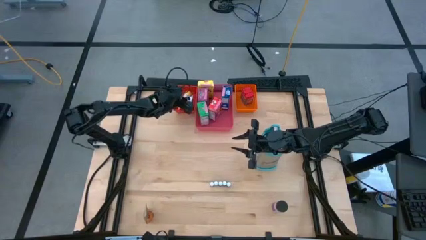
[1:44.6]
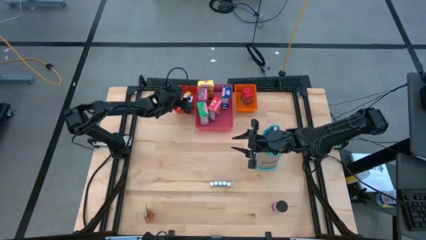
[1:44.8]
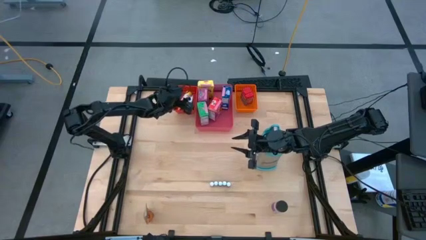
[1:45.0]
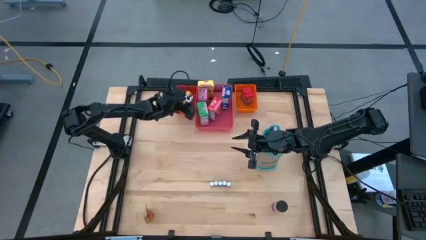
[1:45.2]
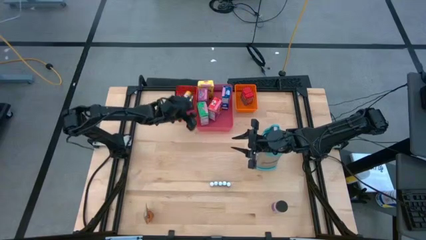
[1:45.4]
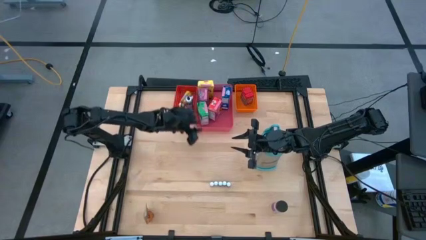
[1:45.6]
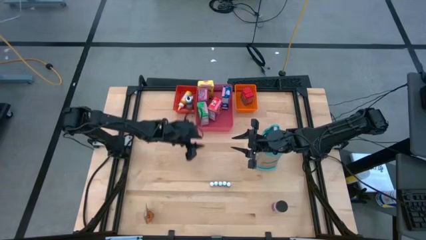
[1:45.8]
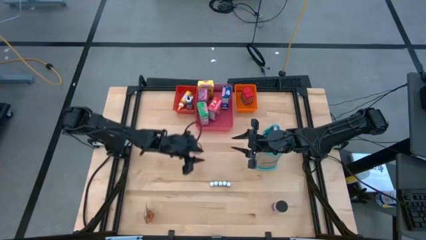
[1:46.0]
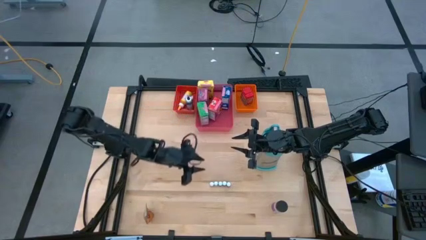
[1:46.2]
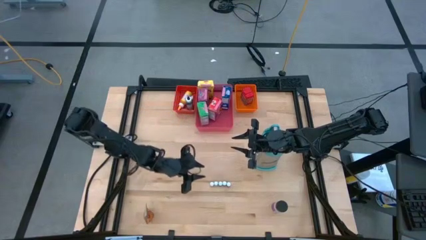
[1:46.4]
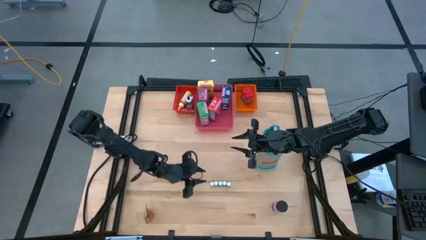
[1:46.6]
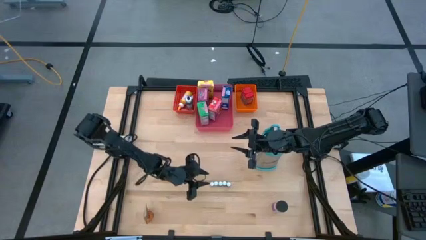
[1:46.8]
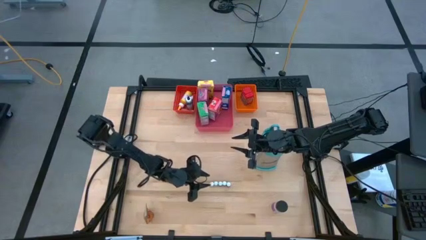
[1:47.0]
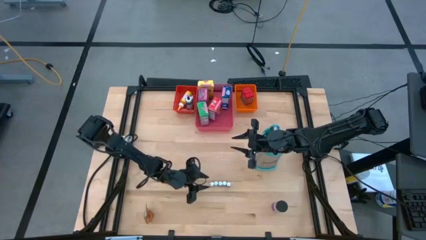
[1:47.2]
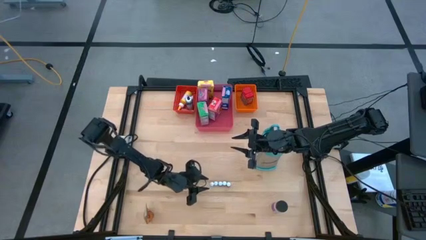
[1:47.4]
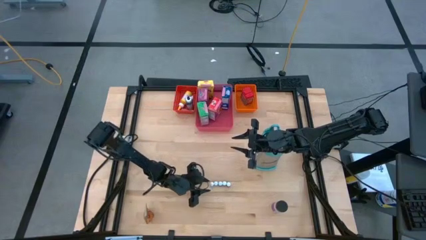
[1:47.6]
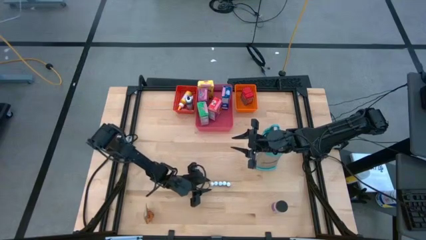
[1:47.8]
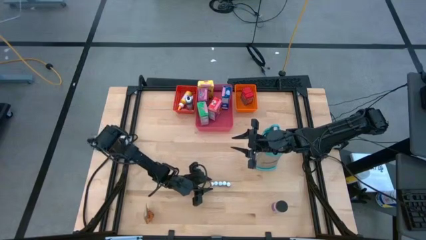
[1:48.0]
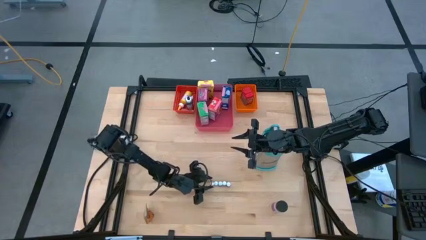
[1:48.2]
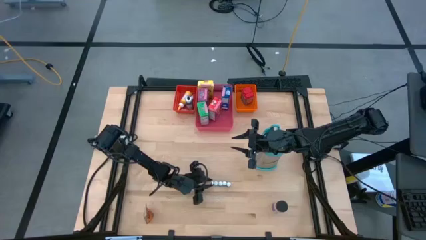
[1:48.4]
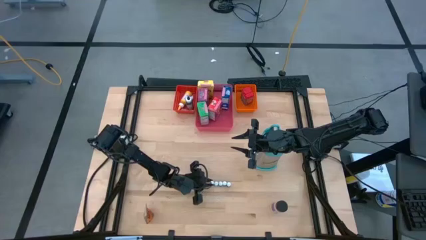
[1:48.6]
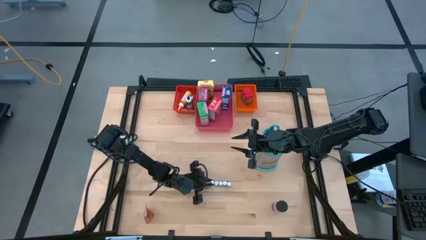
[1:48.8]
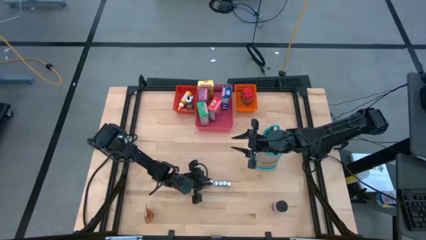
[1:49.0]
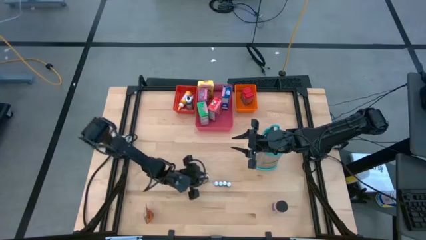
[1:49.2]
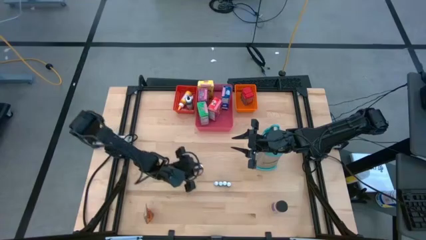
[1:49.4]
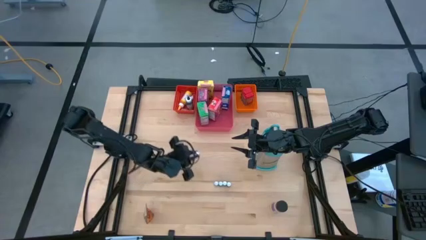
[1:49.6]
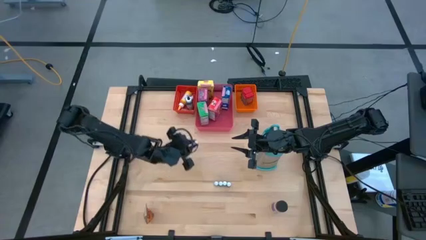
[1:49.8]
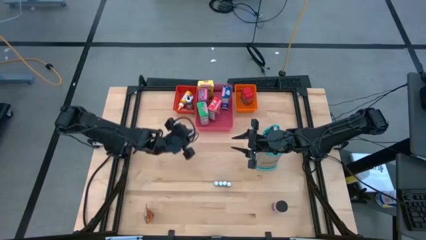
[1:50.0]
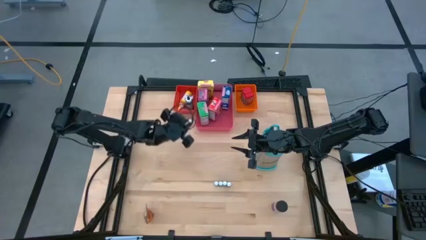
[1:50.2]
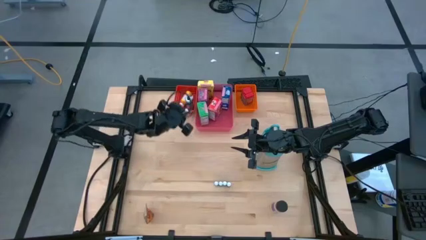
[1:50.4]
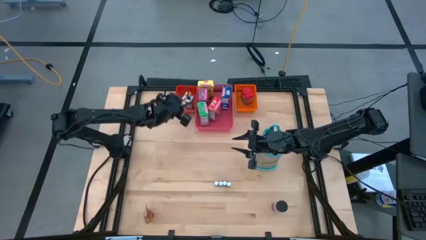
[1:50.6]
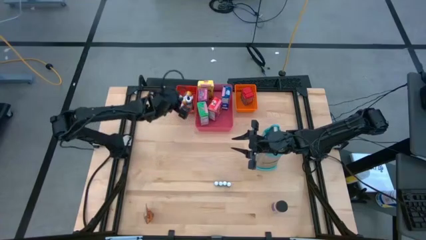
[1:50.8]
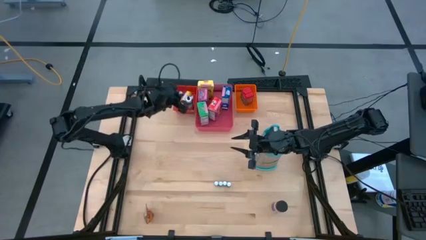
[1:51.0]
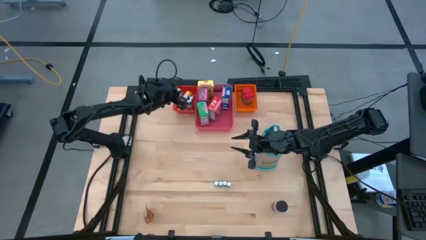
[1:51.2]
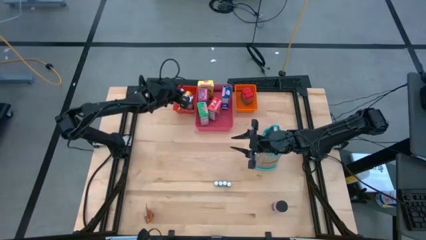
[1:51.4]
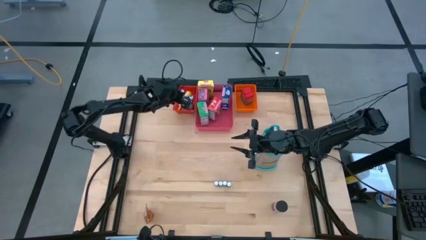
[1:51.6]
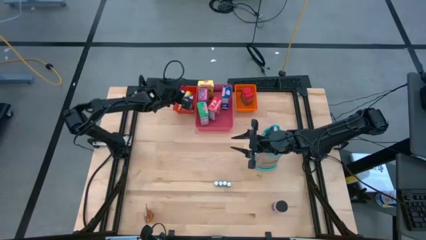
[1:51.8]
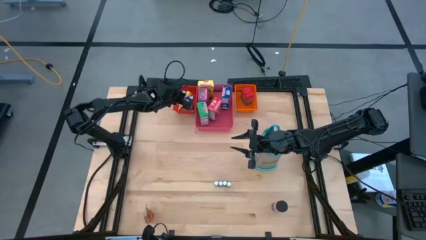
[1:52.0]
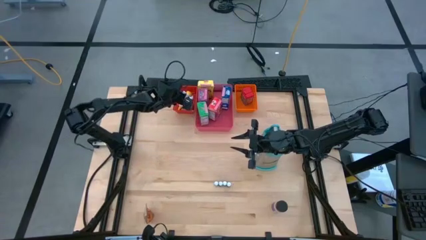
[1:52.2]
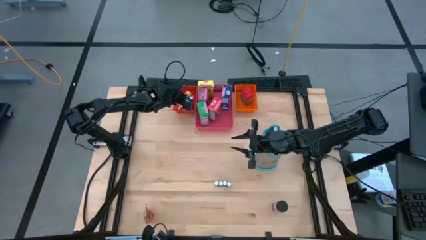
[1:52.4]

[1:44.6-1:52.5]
Task: Pick & Place Kitchen Items
Put the small brown food coloring bottle into the red bin

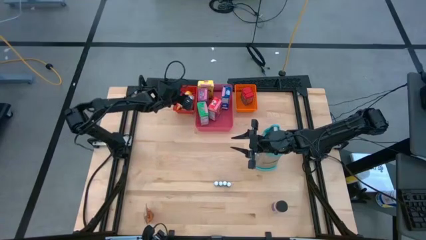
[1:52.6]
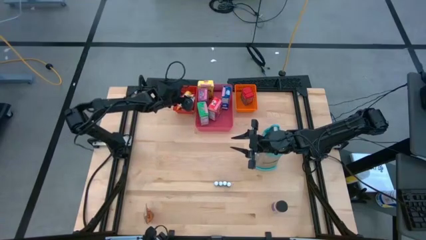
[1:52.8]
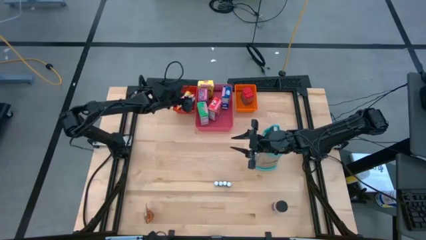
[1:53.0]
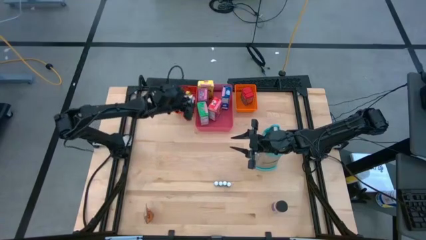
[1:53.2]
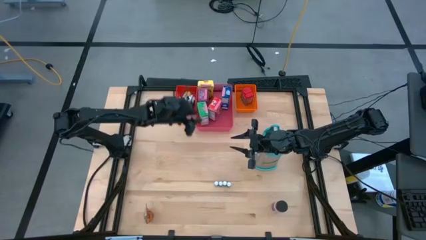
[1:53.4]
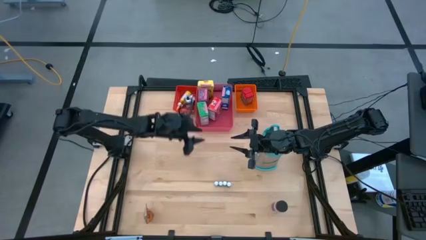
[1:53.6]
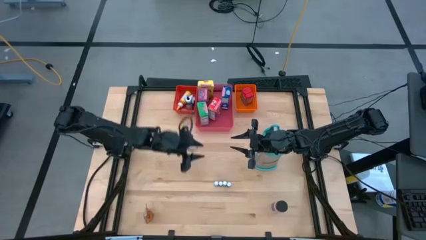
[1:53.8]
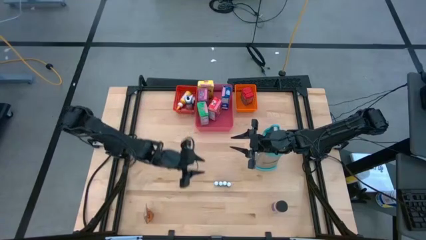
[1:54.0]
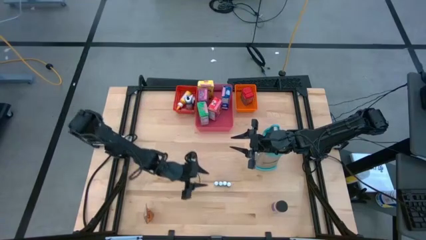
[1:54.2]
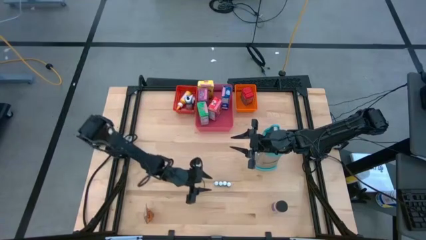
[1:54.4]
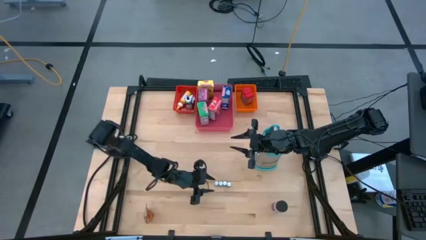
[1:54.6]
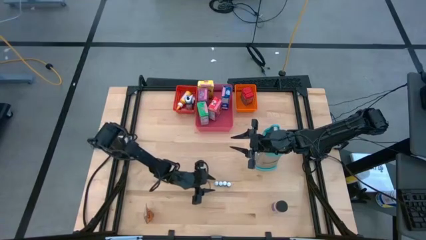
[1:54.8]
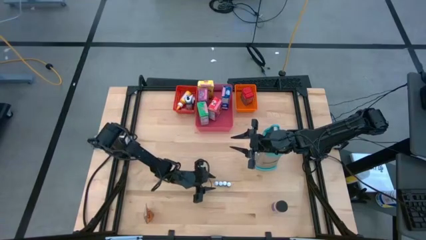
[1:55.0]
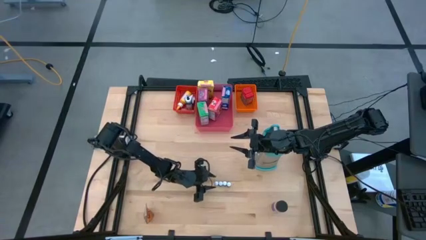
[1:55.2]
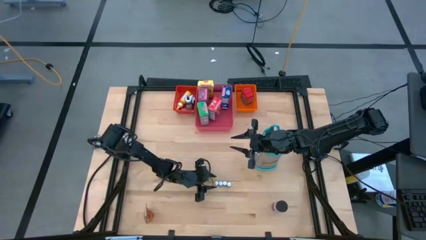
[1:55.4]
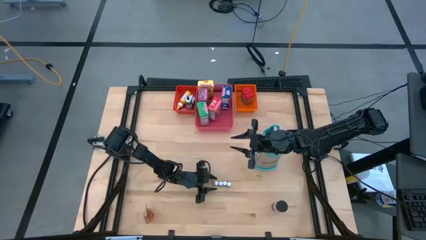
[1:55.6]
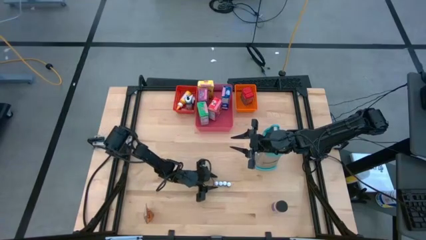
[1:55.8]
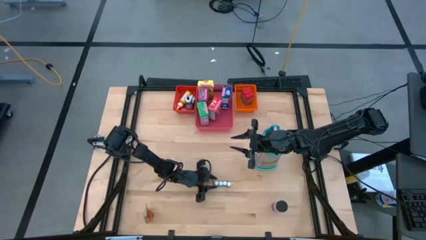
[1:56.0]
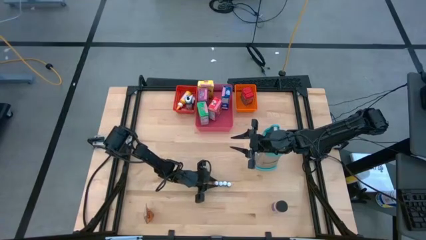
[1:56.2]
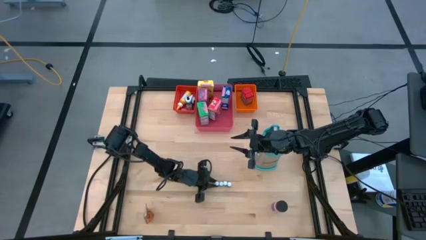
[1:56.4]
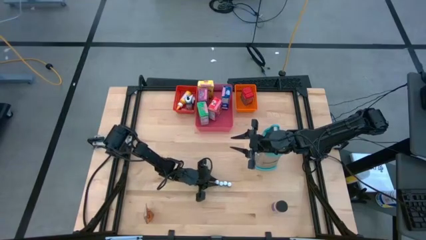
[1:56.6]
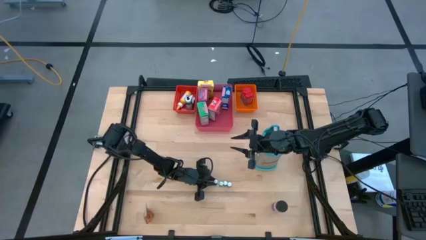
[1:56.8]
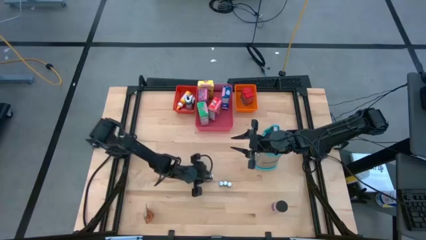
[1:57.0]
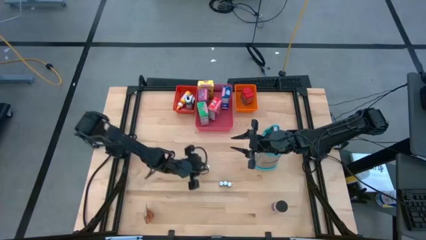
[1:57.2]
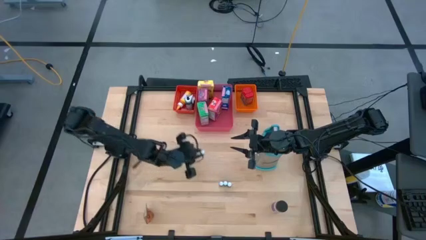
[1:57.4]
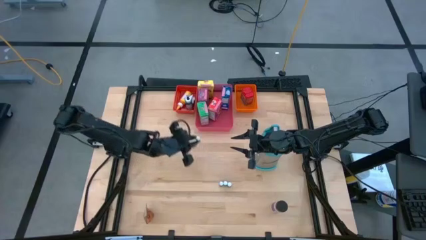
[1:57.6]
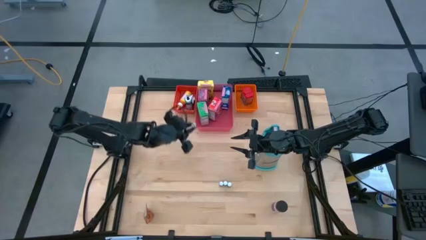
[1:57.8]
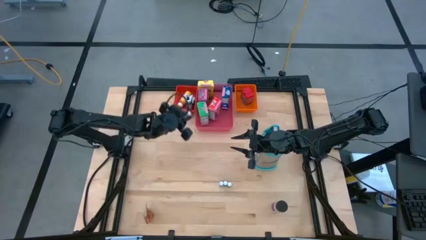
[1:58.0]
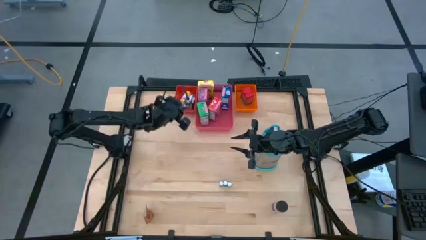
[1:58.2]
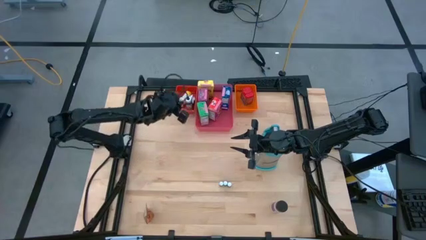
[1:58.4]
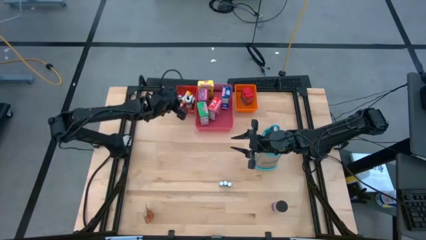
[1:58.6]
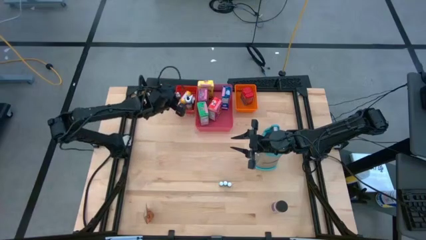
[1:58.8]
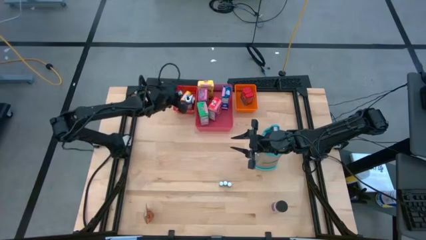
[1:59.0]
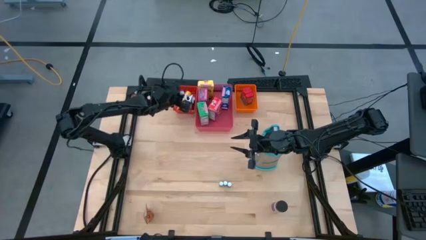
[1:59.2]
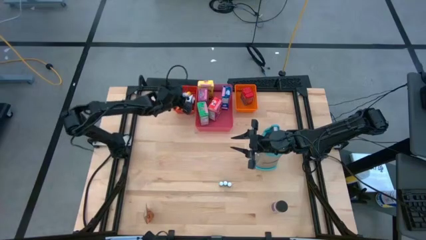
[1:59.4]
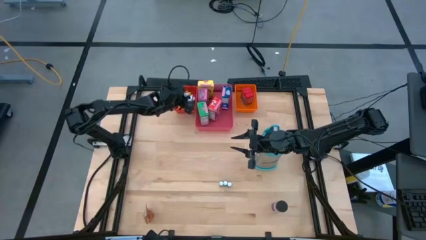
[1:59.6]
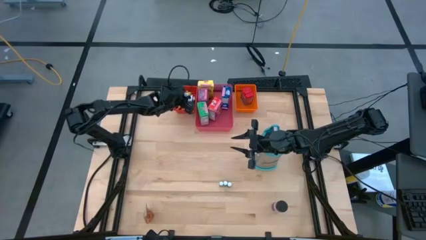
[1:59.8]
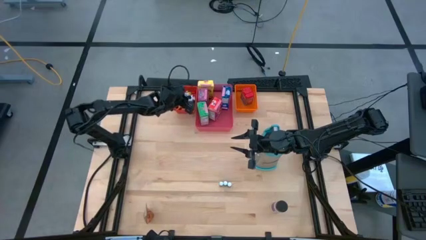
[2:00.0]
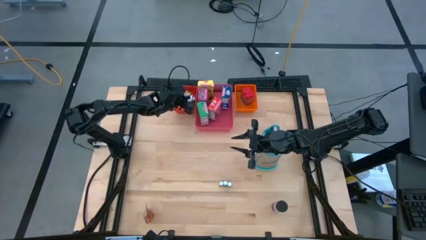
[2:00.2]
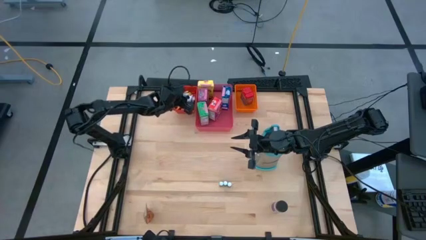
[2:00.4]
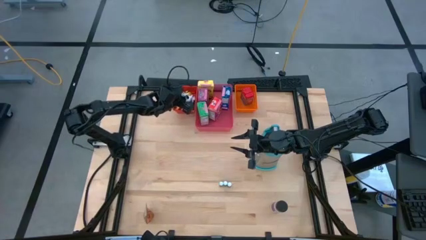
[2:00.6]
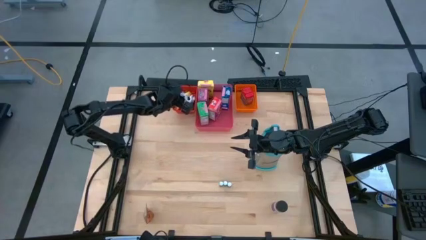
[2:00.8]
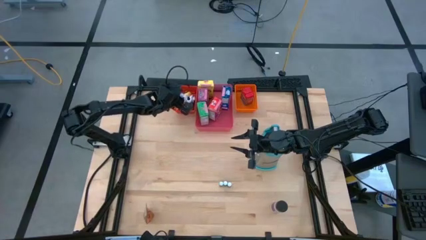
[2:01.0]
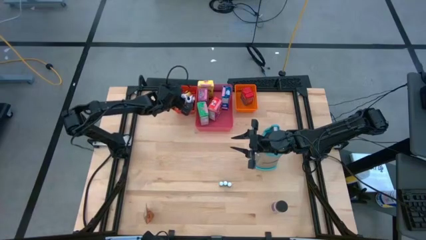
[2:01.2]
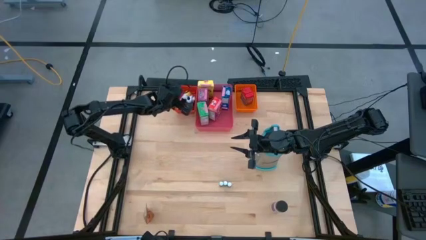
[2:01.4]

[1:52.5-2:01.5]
Put the small black food coloring bottle into the red bin
